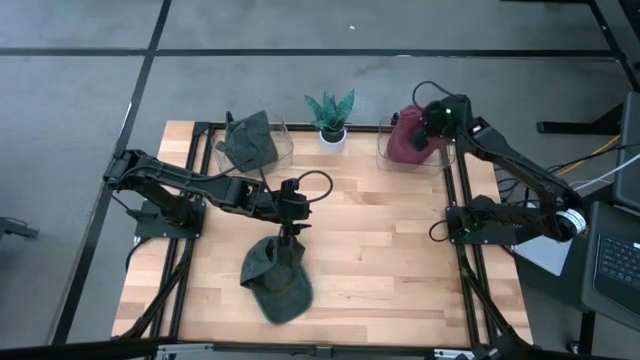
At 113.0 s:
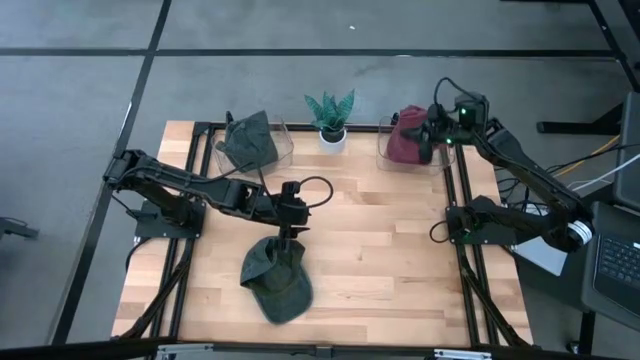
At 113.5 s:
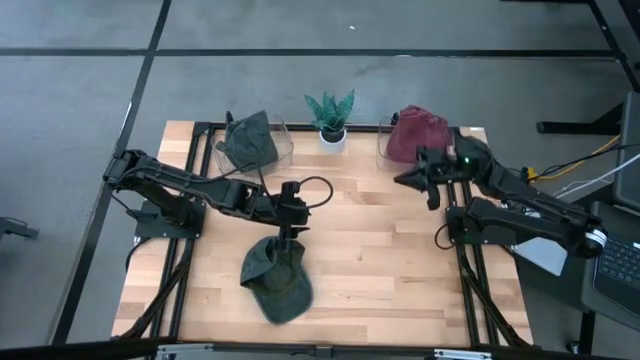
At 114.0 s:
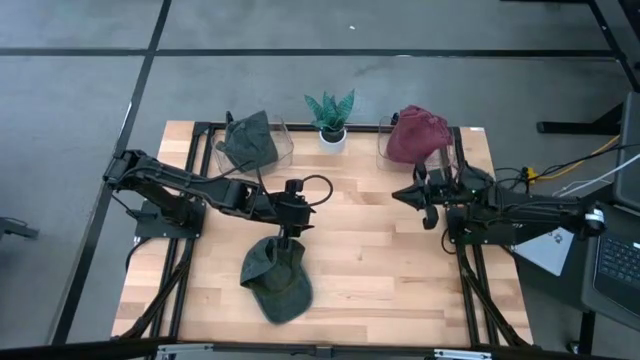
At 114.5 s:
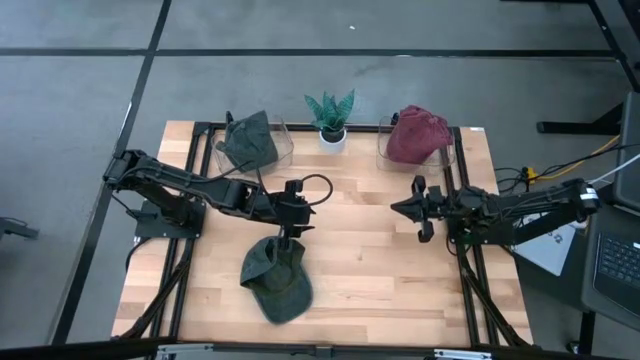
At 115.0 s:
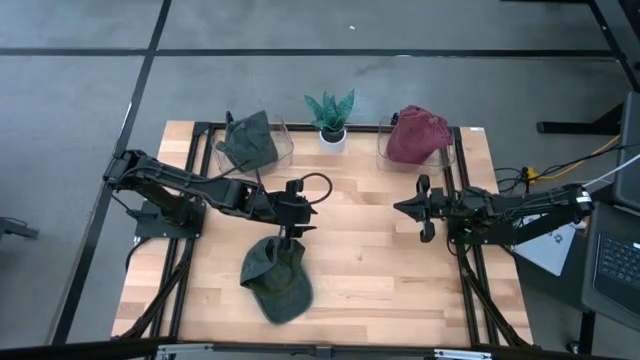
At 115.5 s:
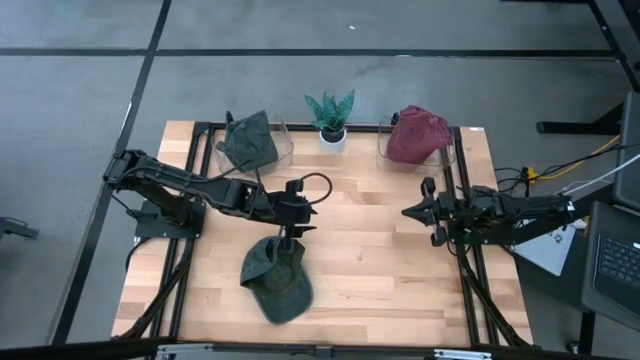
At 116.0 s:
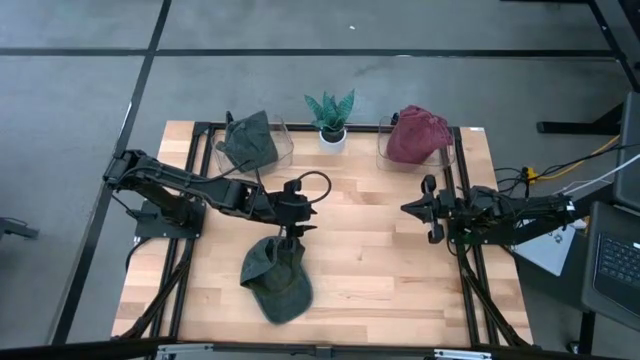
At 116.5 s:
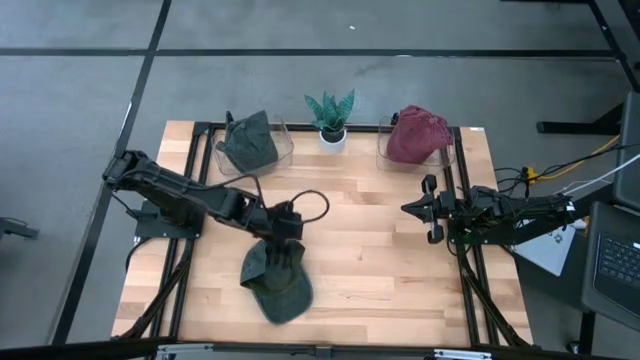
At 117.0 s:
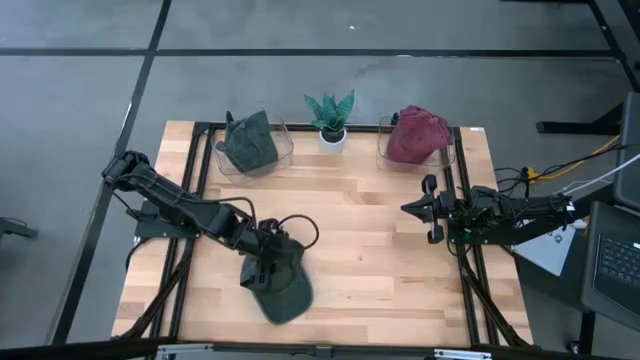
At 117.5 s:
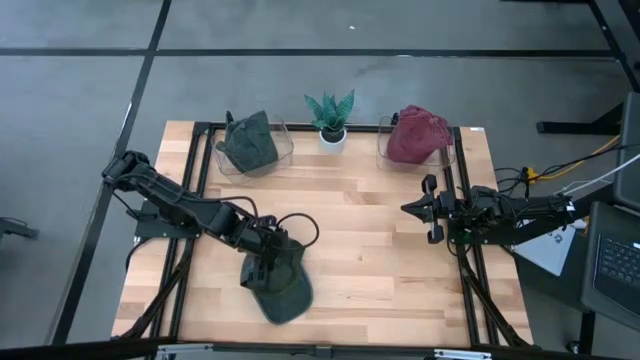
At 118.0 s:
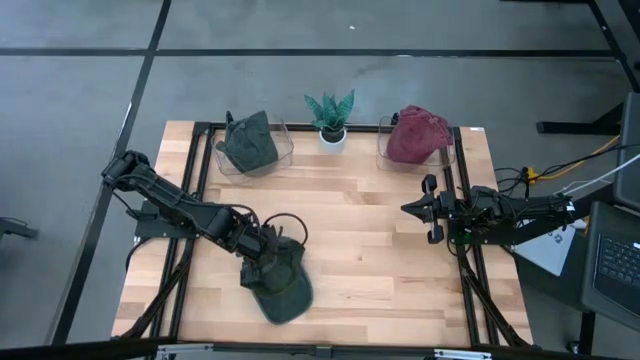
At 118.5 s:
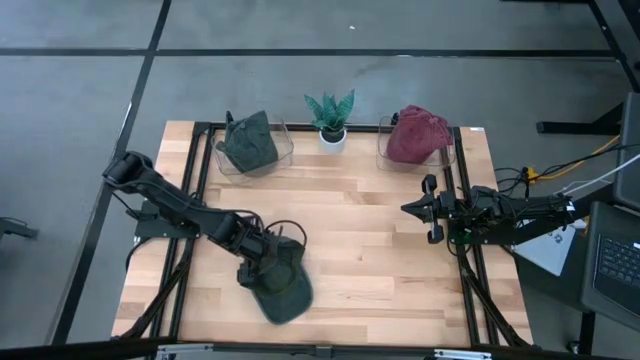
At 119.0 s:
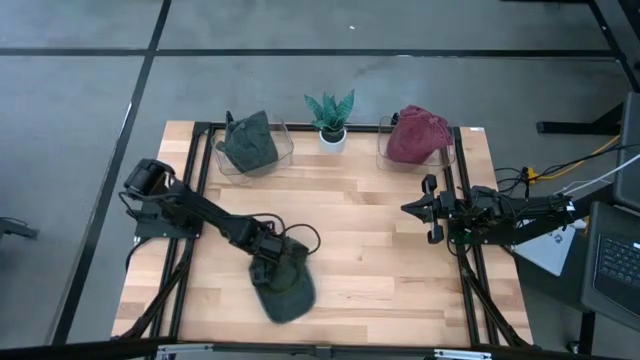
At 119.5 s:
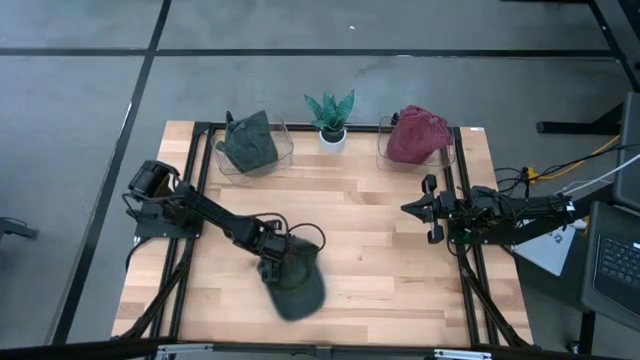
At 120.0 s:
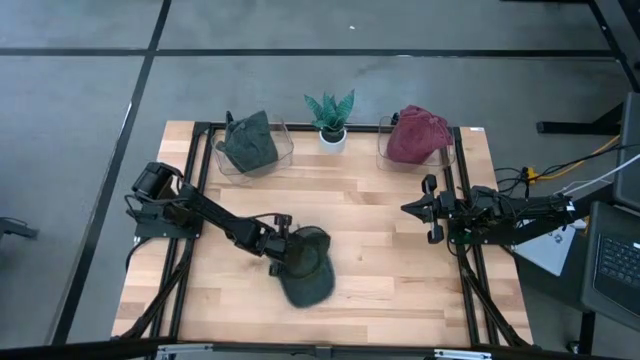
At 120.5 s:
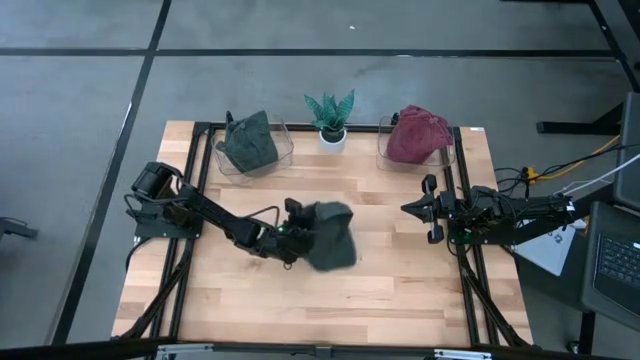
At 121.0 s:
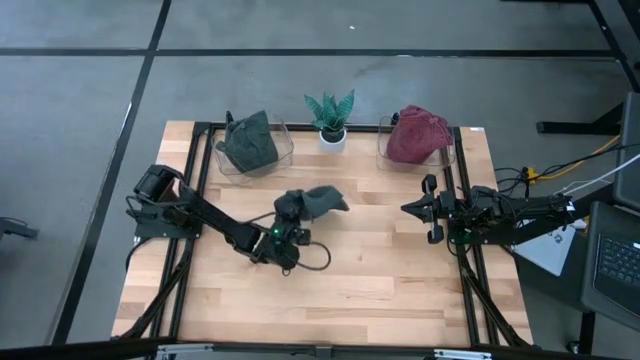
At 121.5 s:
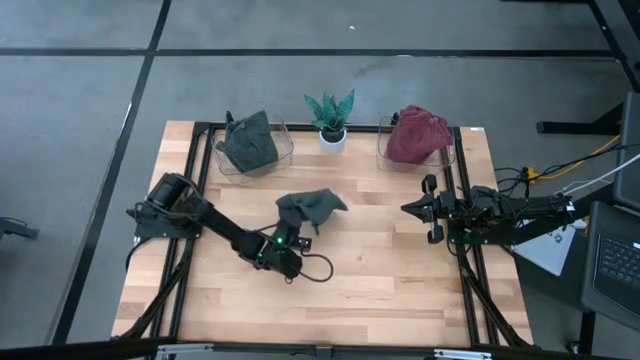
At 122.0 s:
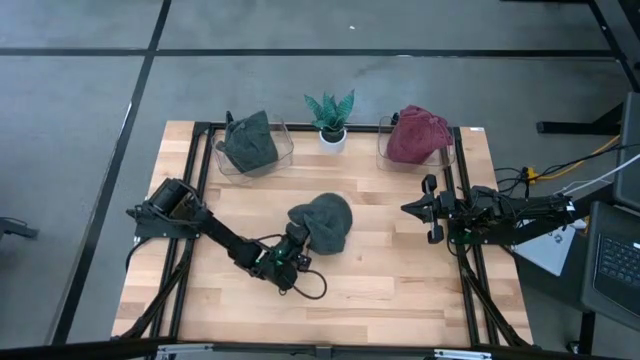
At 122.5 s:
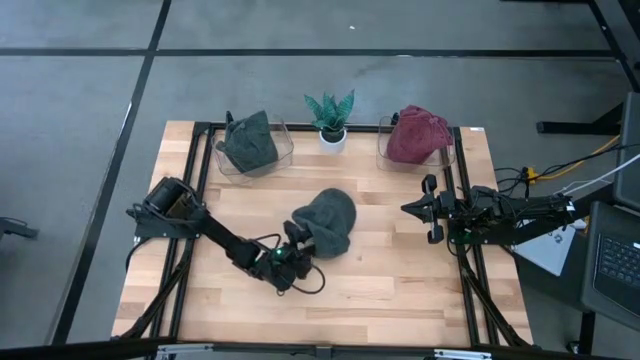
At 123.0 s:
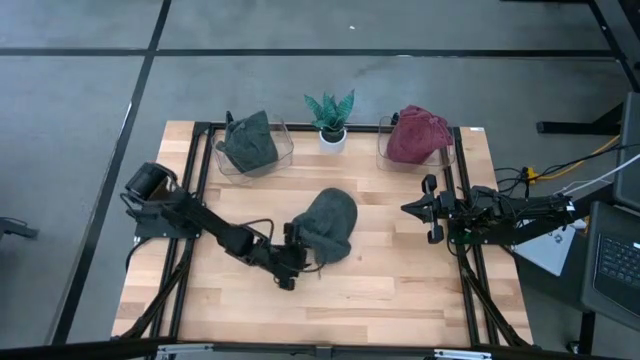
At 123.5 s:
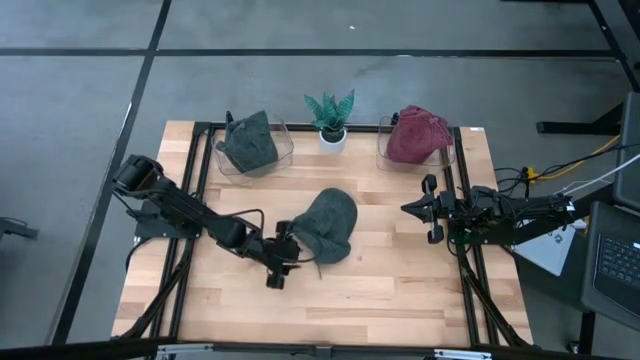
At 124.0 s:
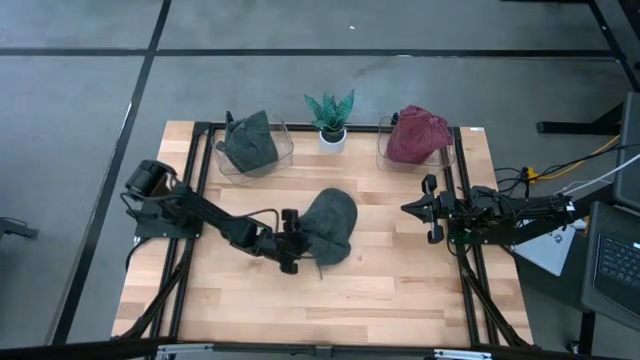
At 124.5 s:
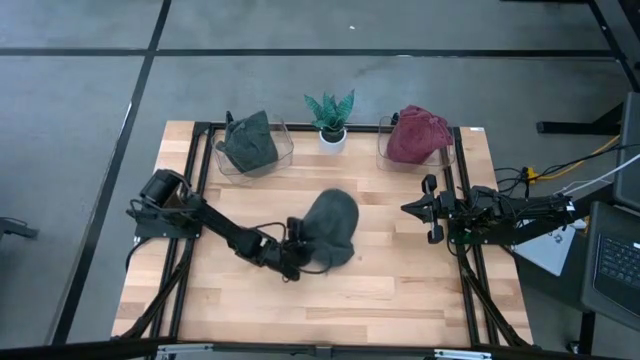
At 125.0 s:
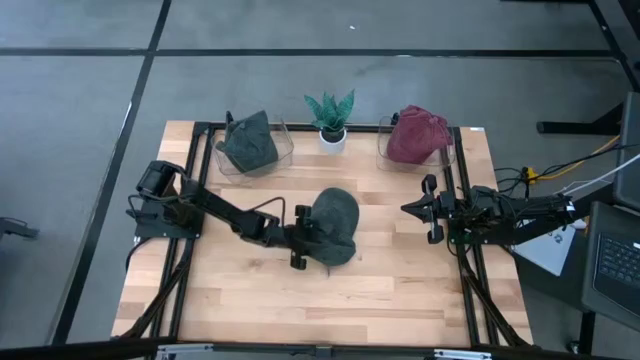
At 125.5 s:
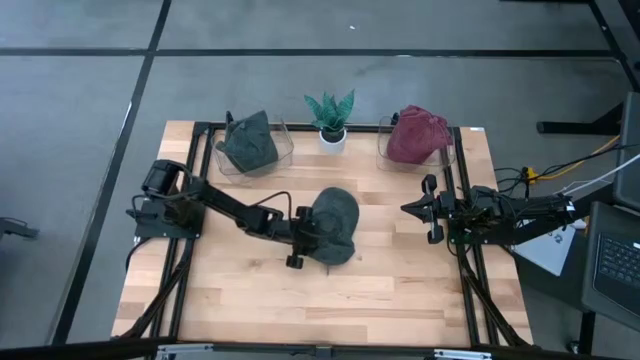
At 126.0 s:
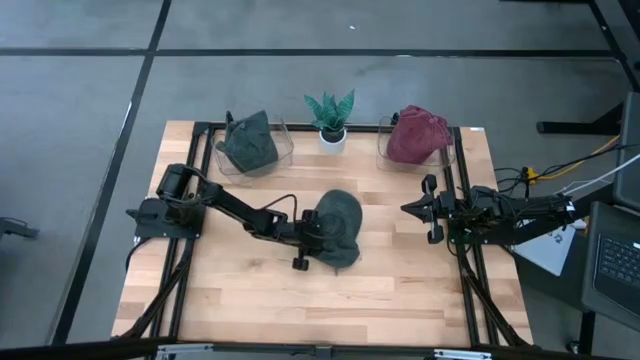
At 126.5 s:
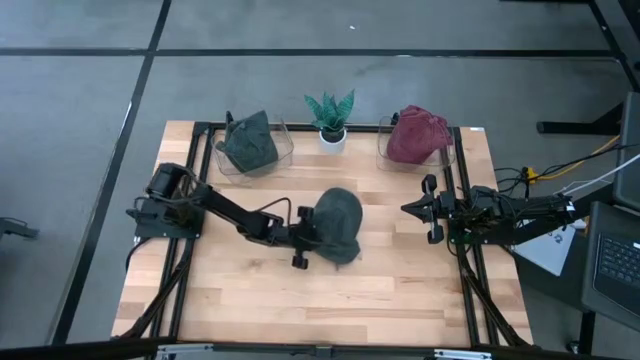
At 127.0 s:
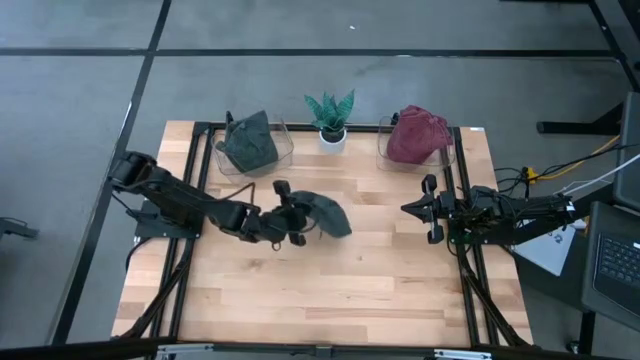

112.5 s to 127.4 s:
Task: Pick & Place hat
Put the black cap into the left transparent bin

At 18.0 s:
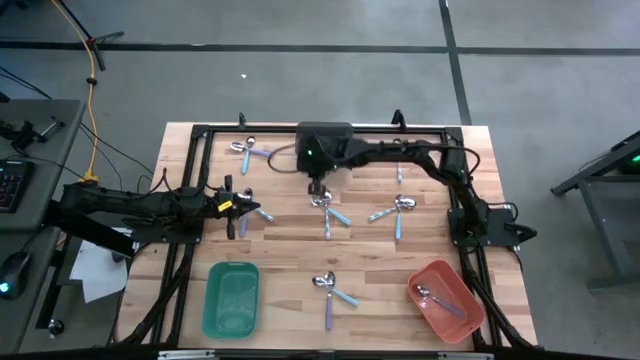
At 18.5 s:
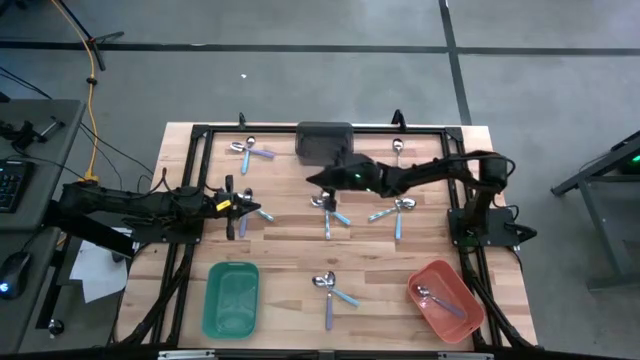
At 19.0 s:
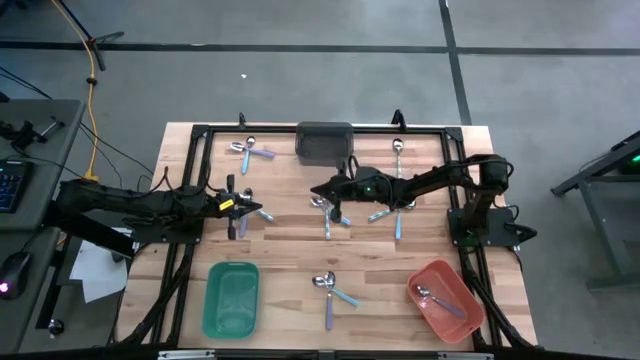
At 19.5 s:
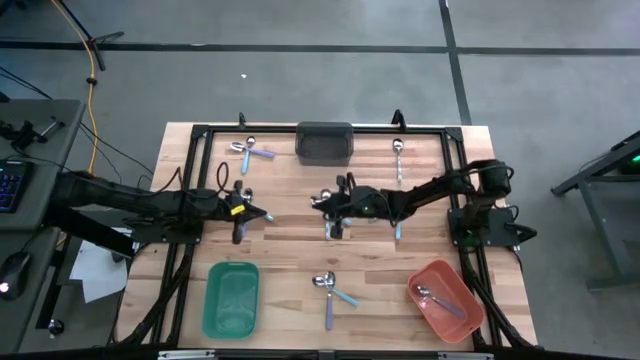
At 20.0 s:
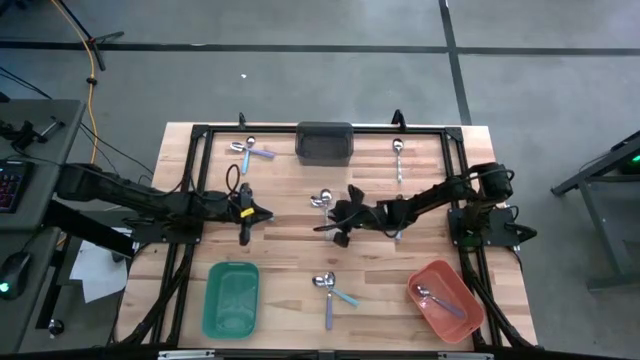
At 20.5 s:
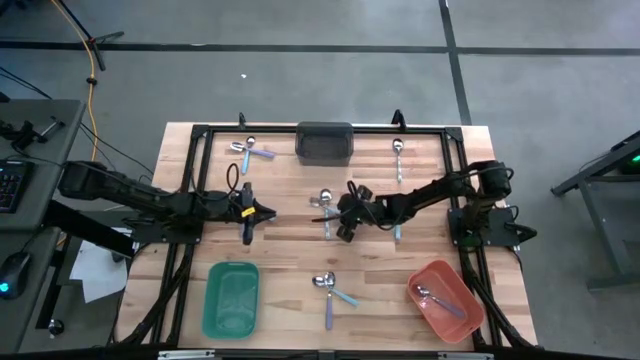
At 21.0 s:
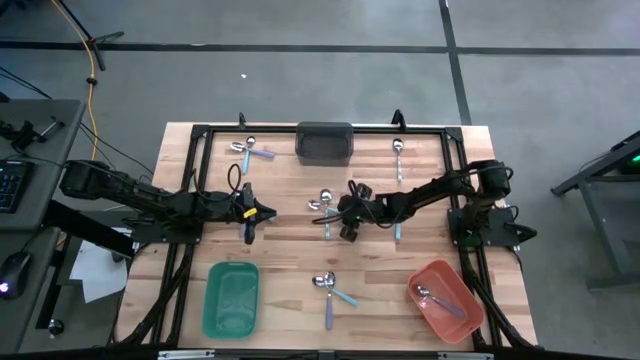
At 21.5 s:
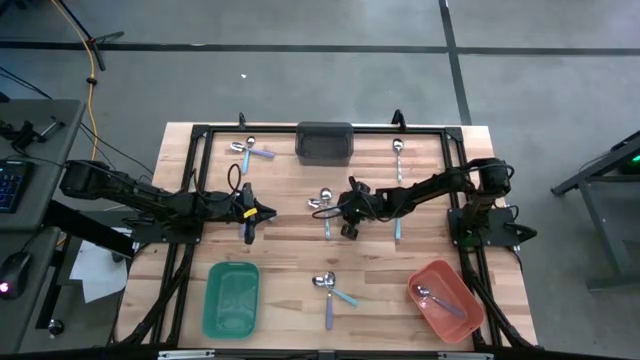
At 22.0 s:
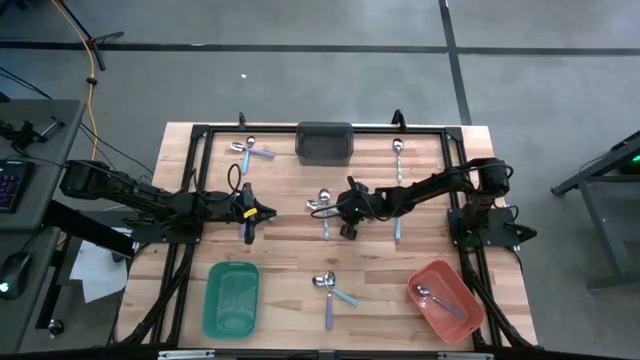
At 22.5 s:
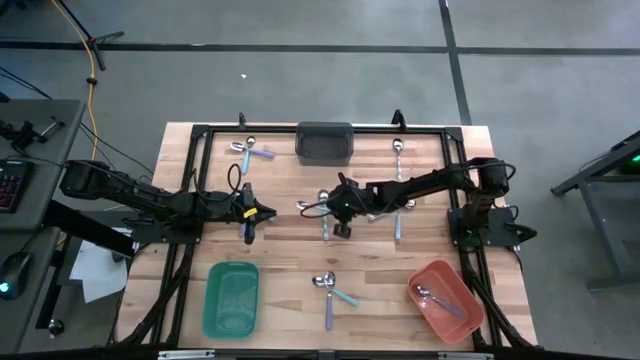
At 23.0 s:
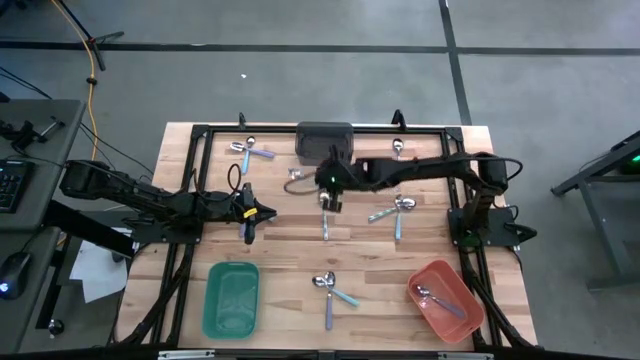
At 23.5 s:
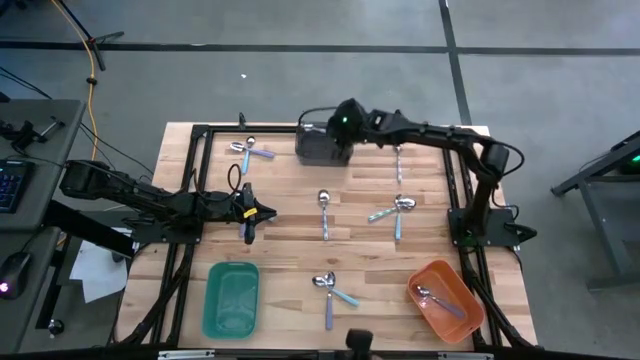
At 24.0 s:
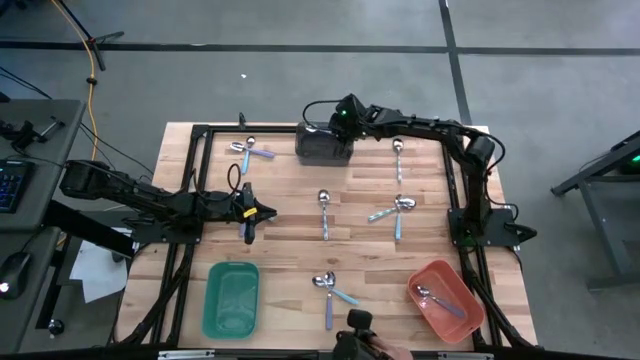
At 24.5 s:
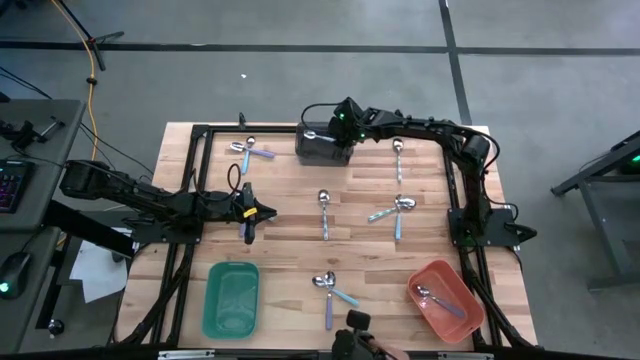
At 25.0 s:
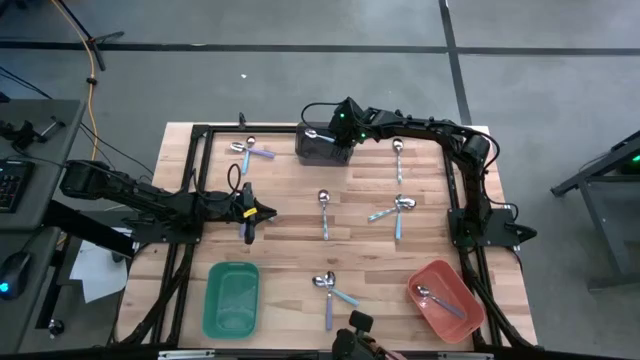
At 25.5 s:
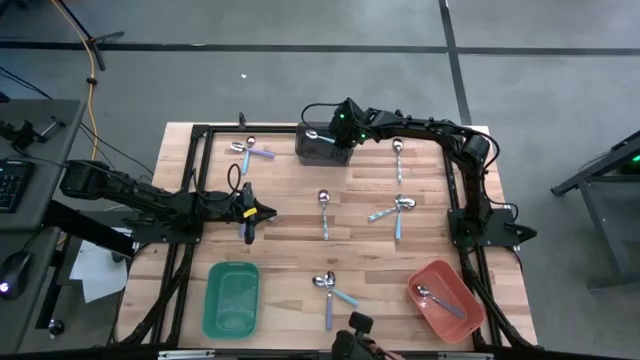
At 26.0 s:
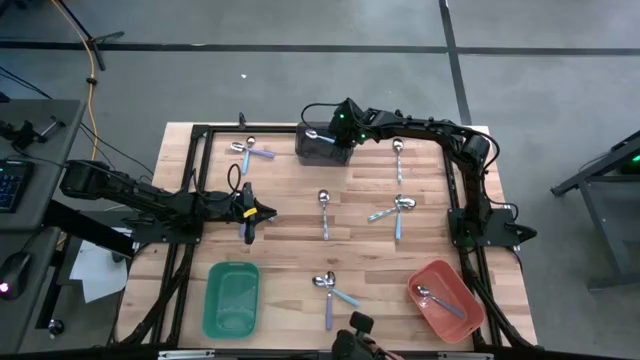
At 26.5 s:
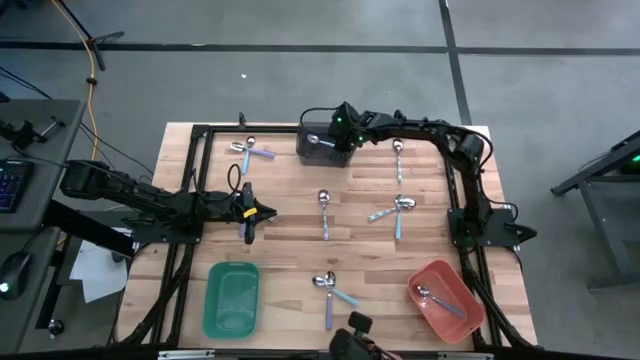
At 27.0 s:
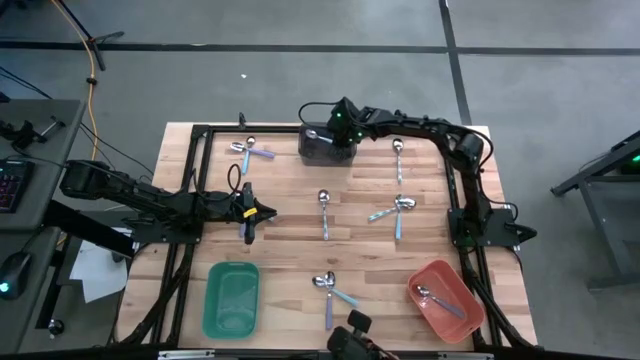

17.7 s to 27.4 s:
Task: Sort silverware by color (type)
Put the blue spoon into the black bin
